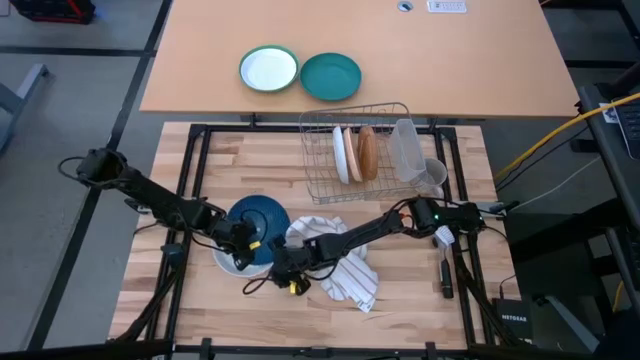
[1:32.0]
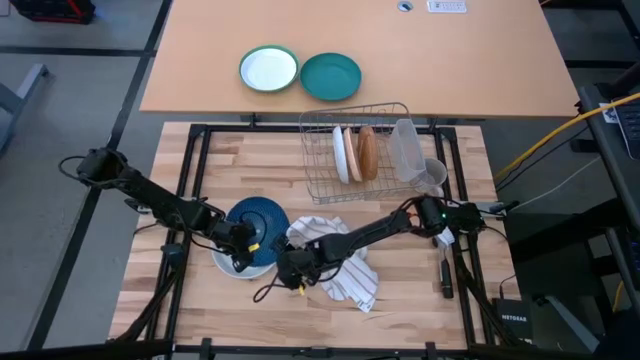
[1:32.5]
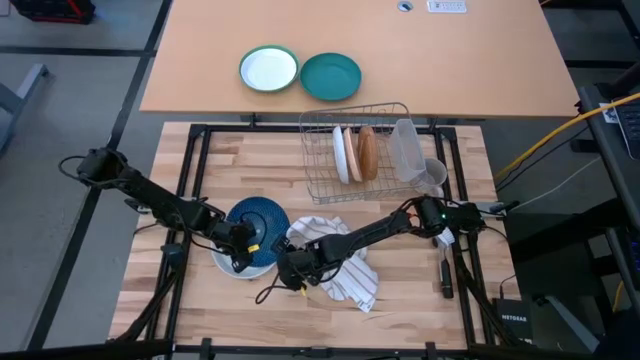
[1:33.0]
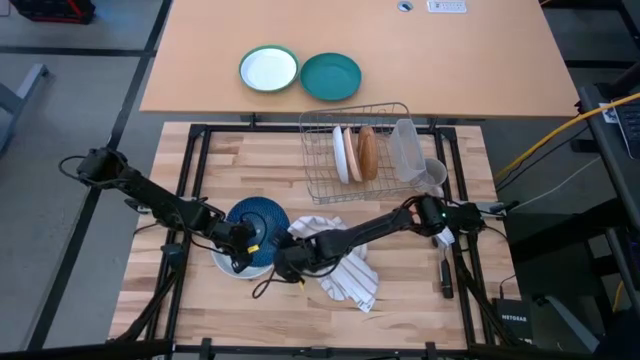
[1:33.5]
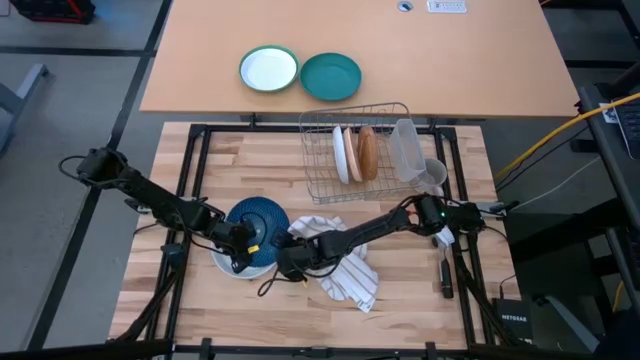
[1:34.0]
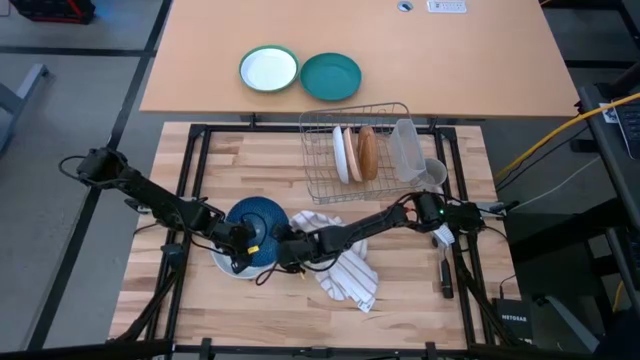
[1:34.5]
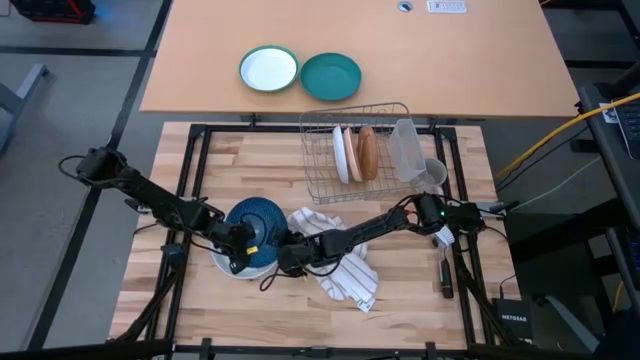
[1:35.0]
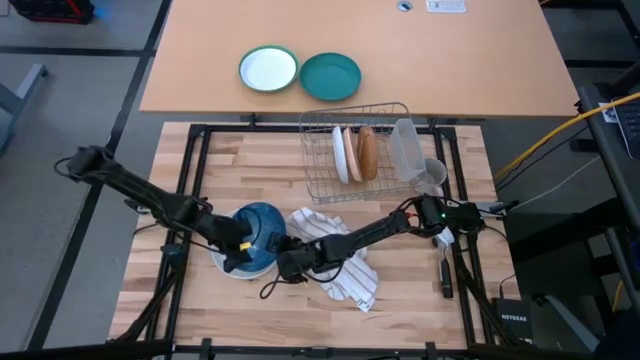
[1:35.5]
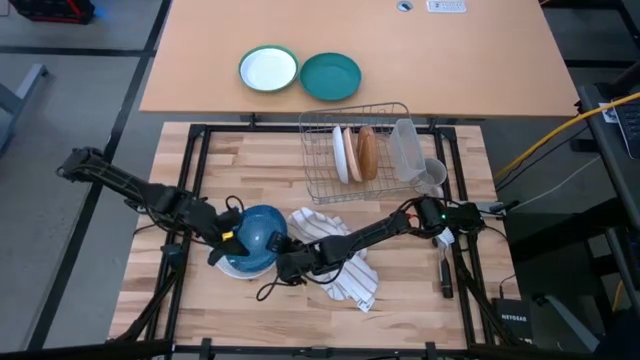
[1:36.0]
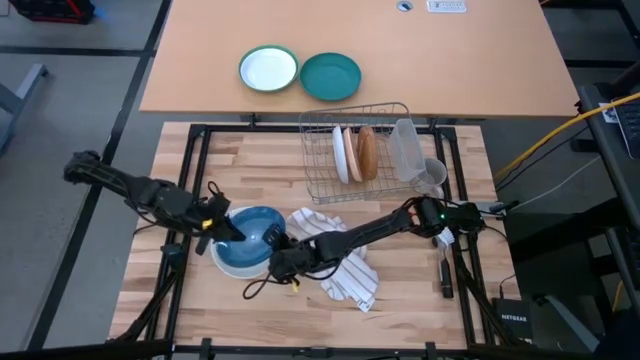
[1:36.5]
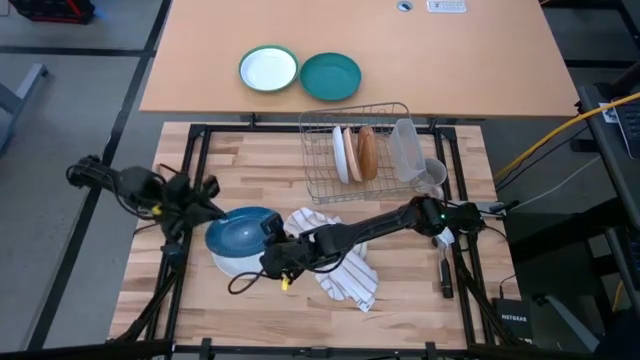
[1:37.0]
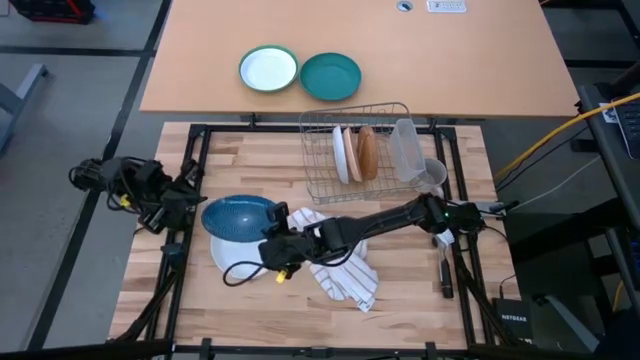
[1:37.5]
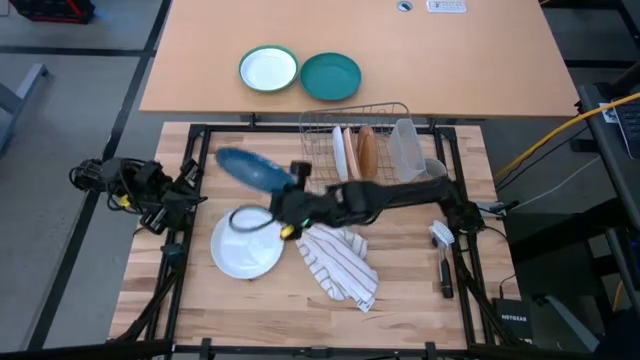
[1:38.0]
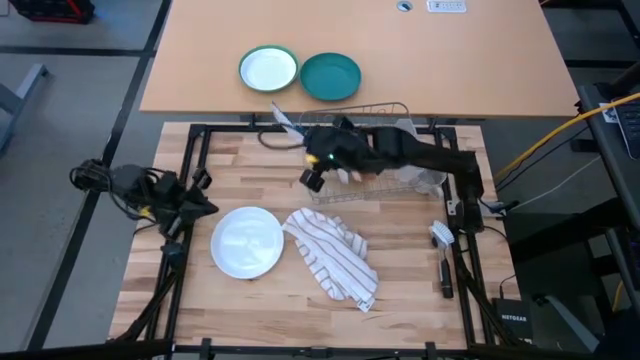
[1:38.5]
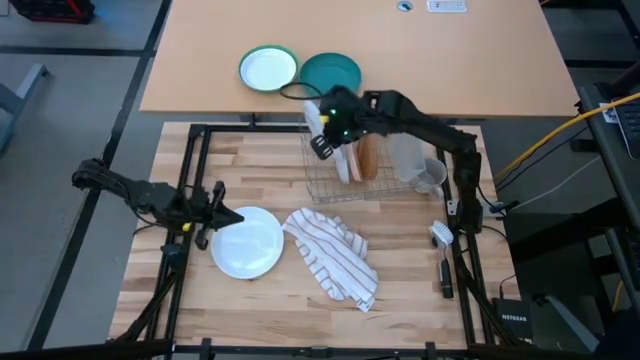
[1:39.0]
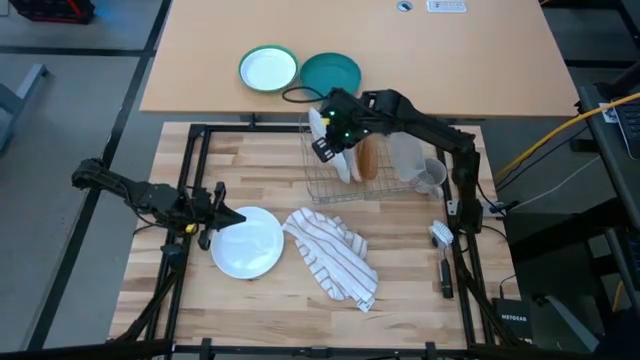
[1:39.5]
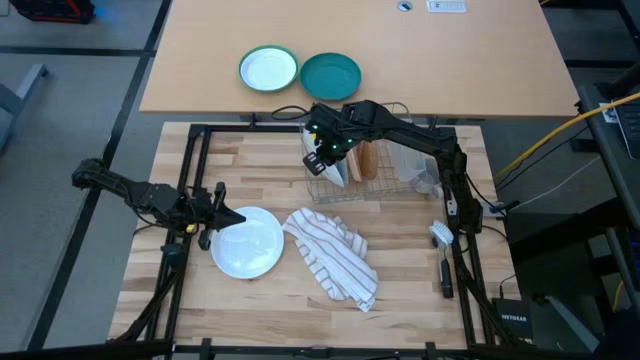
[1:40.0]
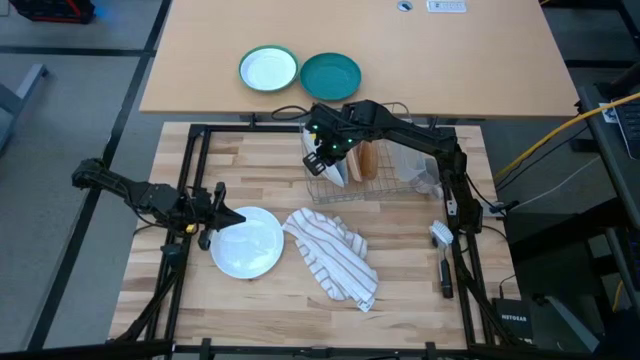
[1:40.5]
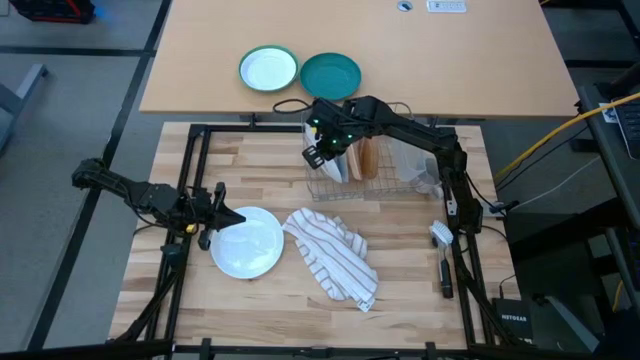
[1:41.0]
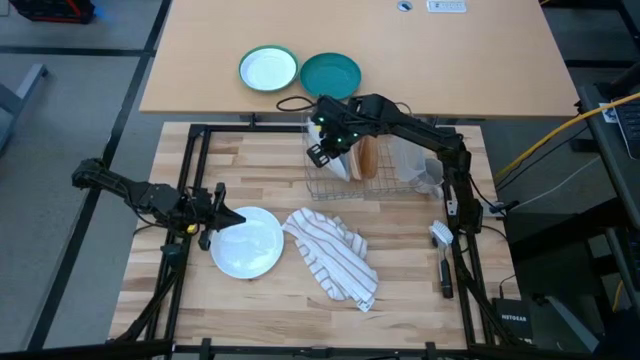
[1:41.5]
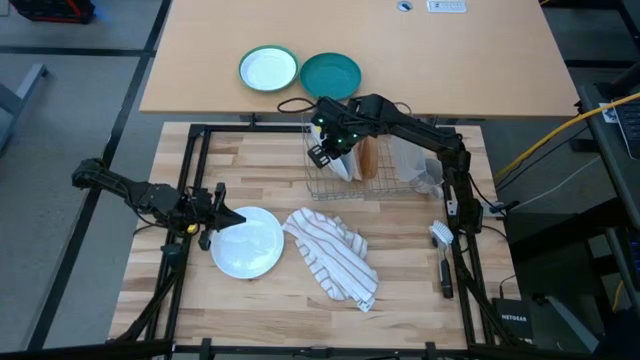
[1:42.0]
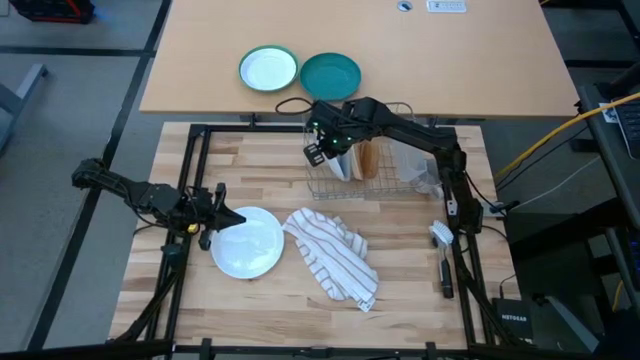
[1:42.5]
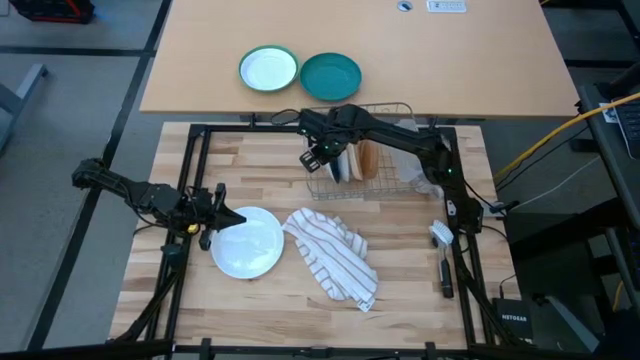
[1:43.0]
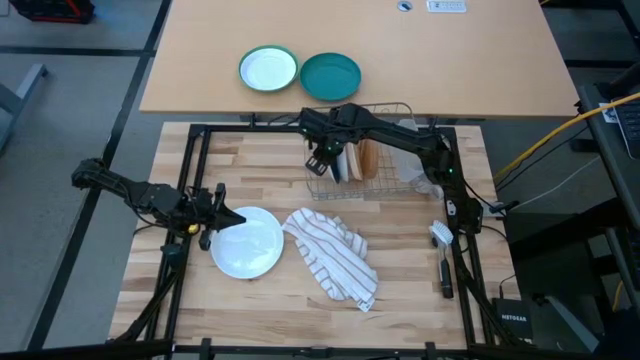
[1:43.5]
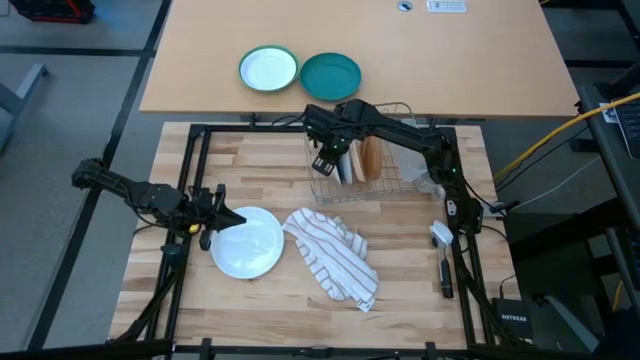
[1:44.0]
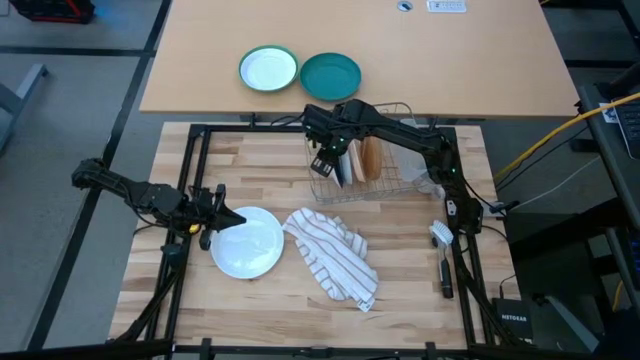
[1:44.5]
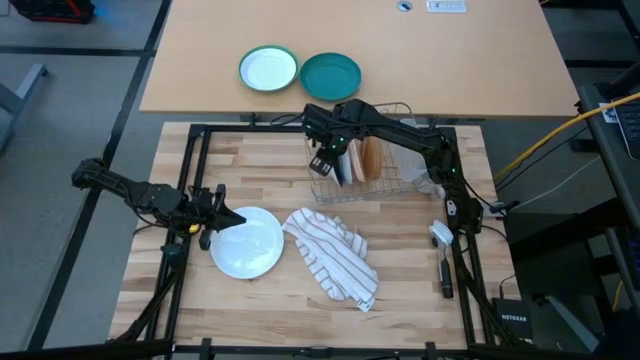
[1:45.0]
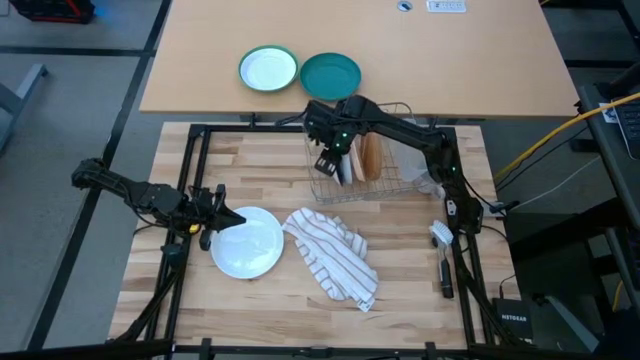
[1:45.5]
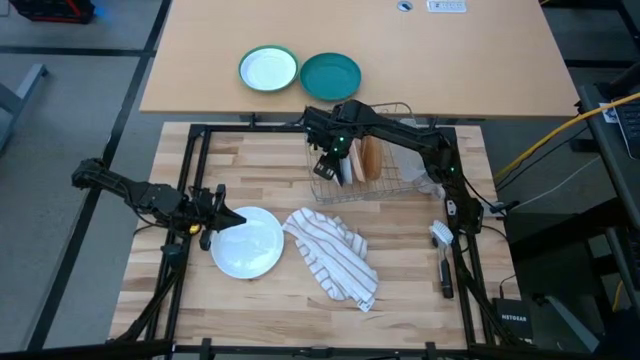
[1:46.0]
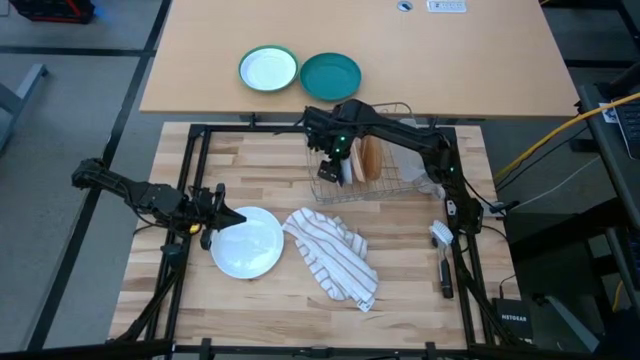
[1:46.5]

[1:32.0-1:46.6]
Task: Sort dishes
Put the blue plate into the dish rack

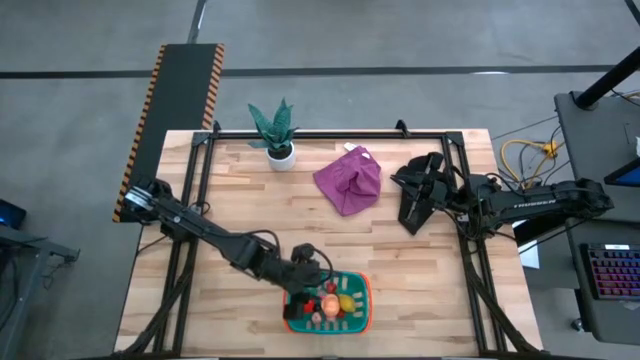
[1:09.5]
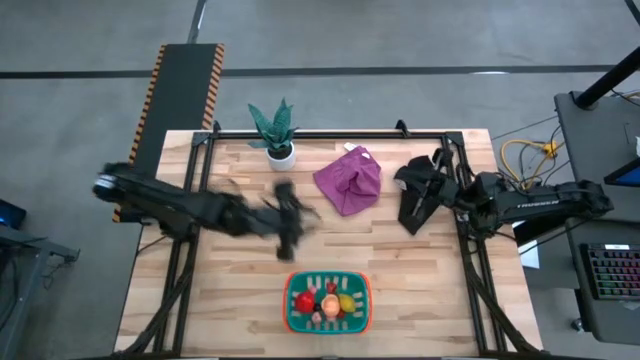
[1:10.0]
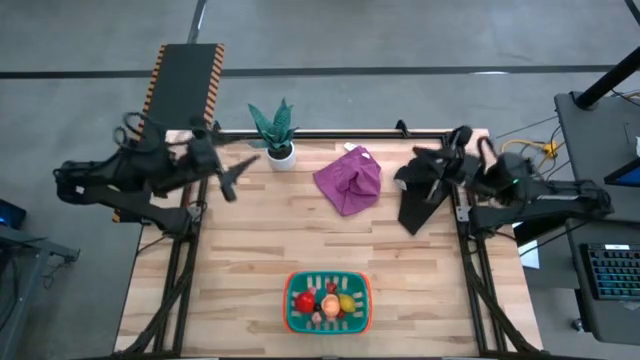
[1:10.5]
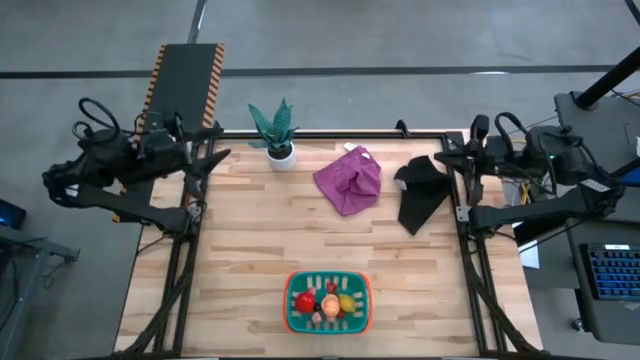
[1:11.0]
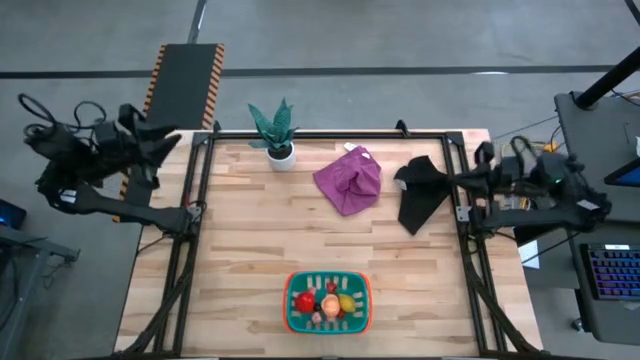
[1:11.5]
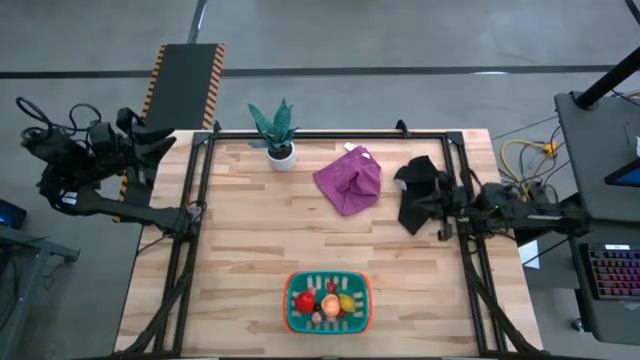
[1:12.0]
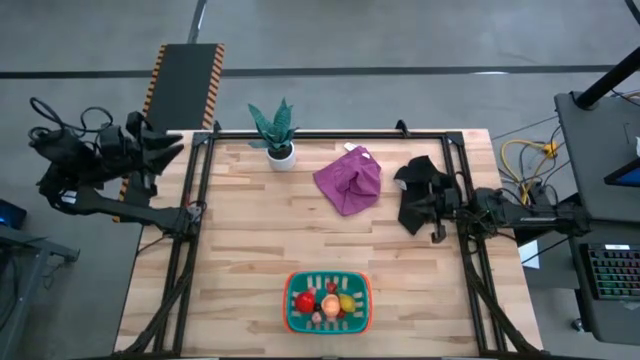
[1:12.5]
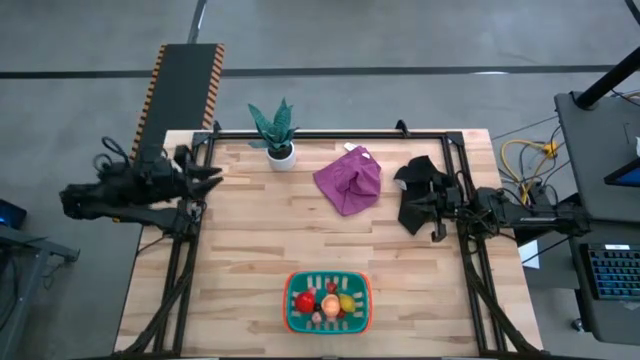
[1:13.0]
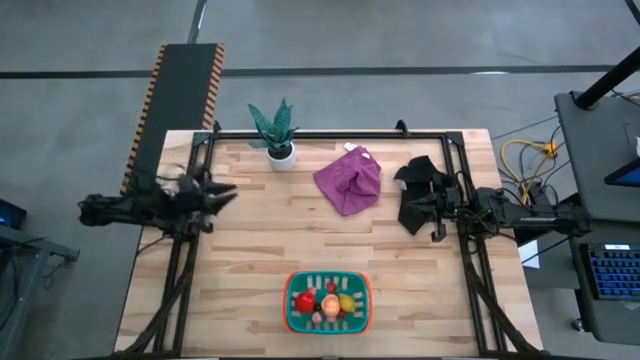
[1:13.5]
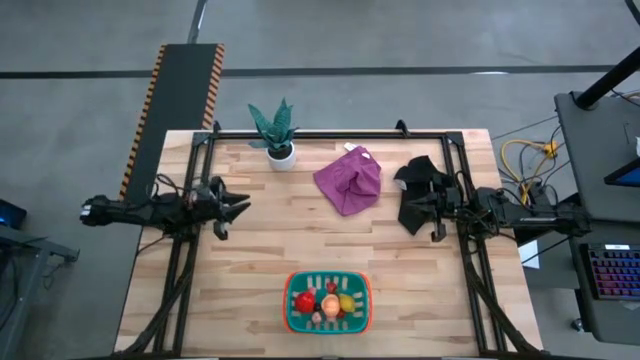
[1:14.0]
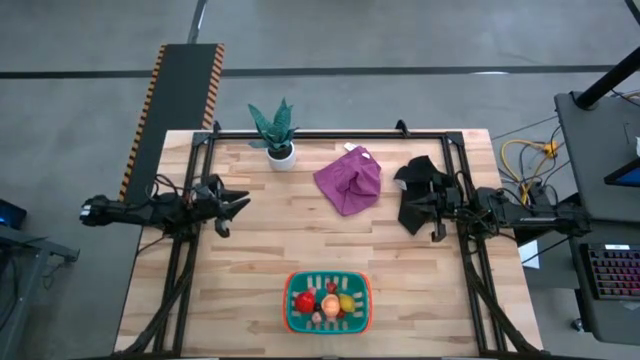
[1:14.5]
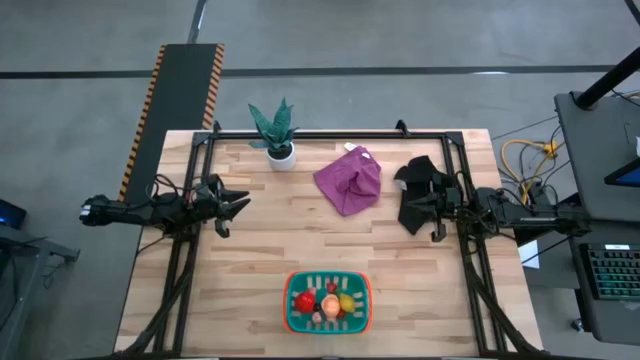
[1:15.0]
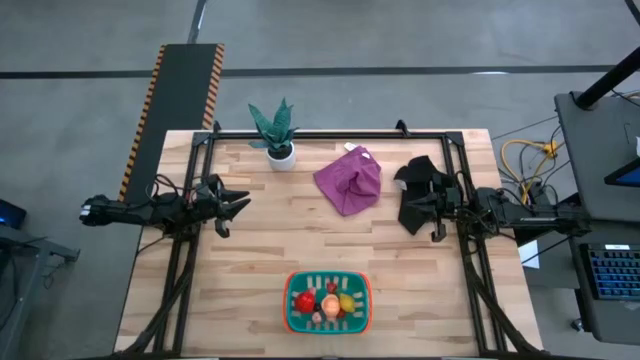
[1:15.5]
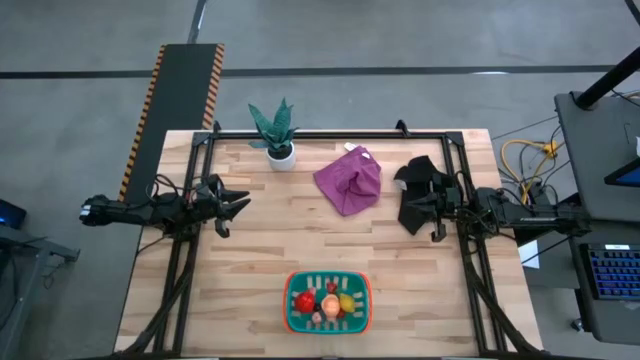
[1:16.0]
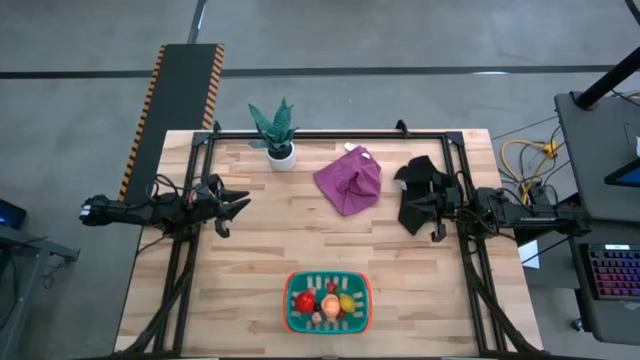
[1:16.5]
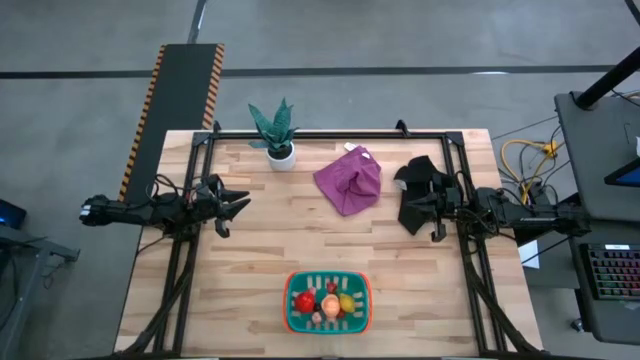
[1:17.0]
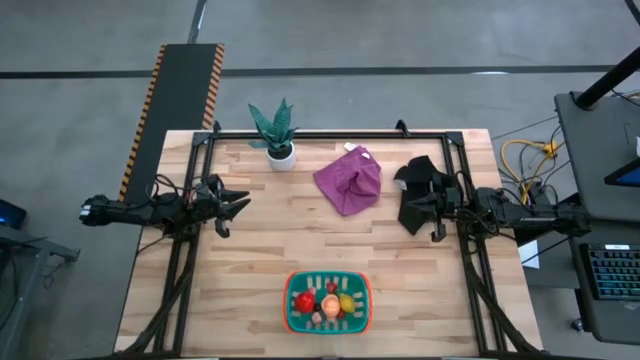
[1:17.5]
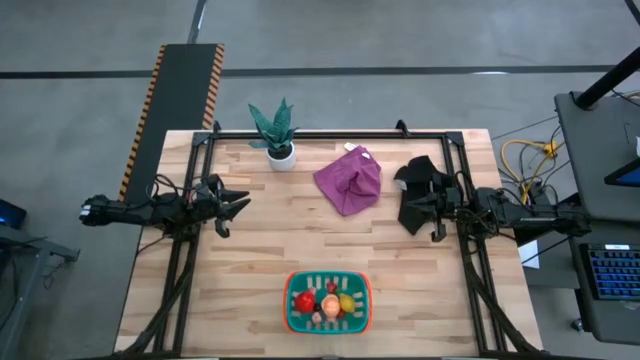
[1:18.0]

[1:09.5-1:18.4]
Task: Pick and placing Produce into tupperware
Return to Home Position
